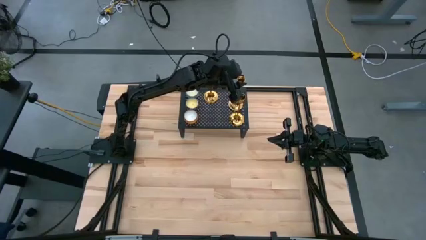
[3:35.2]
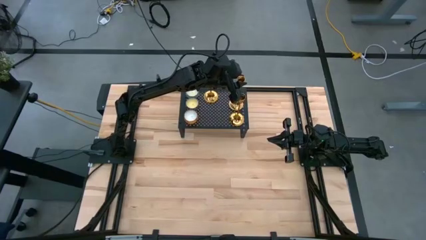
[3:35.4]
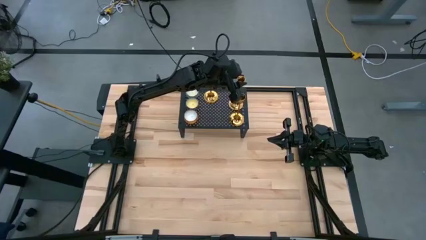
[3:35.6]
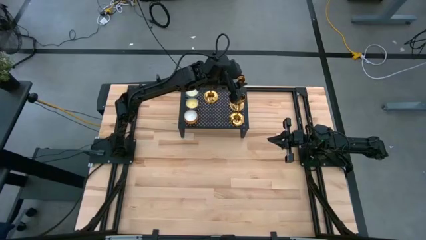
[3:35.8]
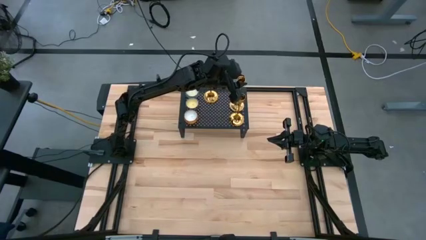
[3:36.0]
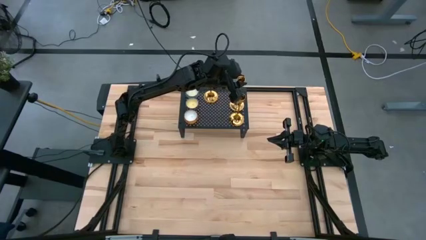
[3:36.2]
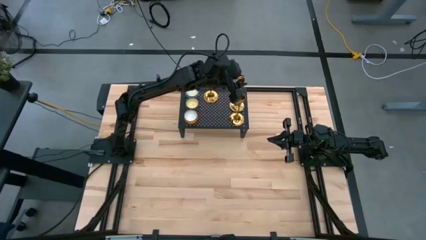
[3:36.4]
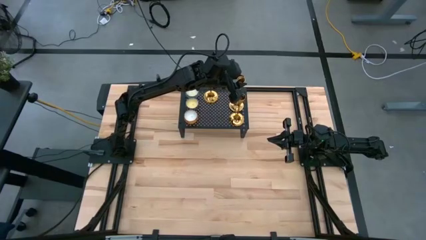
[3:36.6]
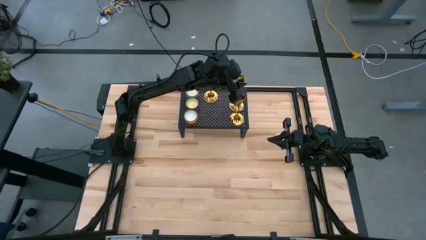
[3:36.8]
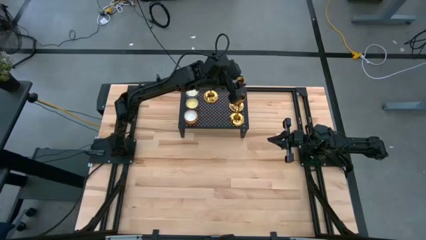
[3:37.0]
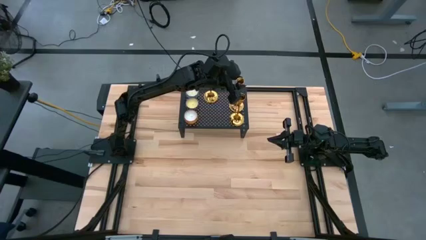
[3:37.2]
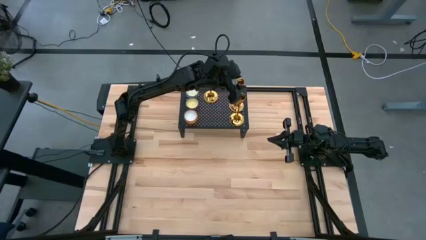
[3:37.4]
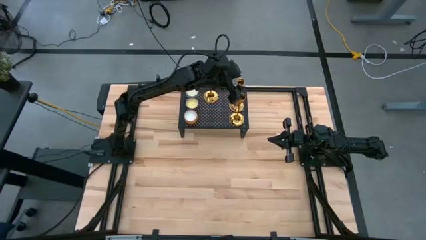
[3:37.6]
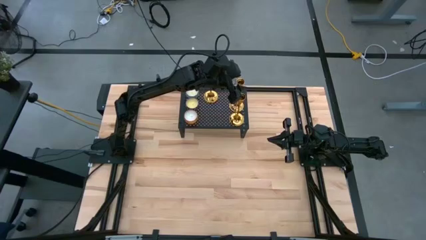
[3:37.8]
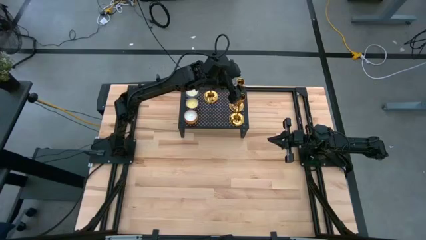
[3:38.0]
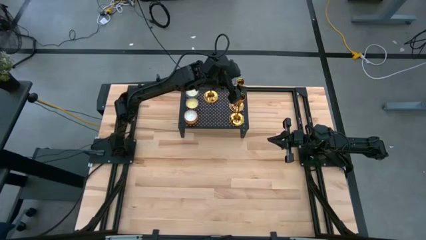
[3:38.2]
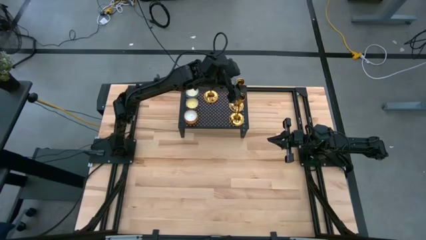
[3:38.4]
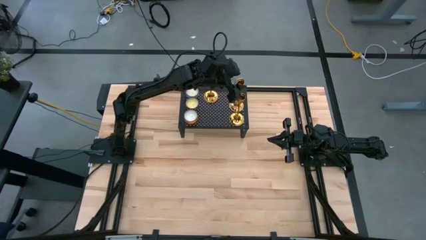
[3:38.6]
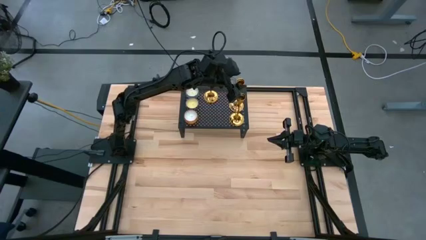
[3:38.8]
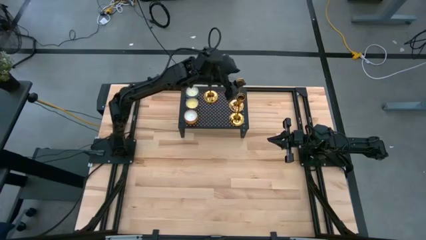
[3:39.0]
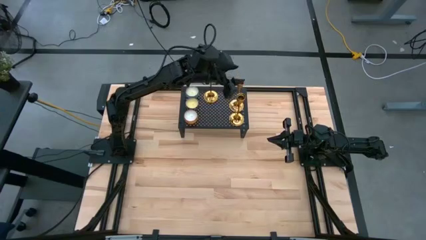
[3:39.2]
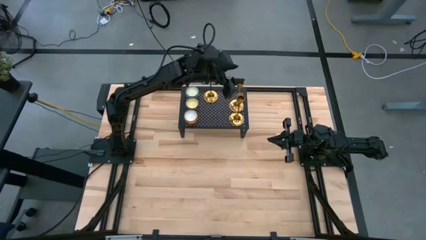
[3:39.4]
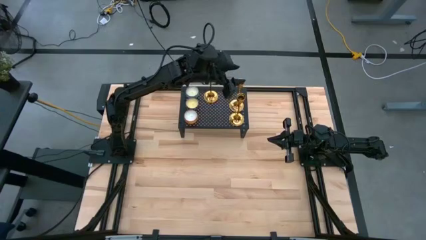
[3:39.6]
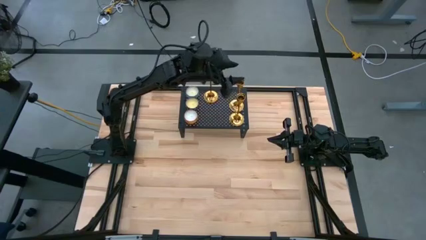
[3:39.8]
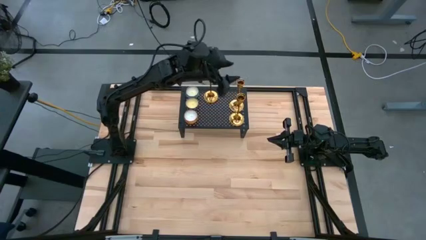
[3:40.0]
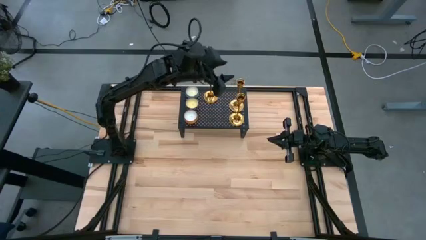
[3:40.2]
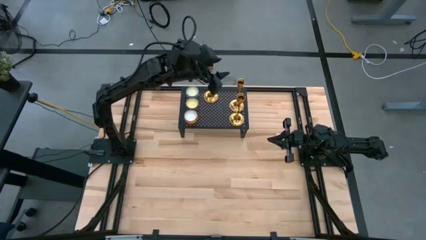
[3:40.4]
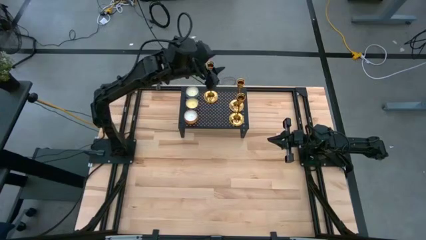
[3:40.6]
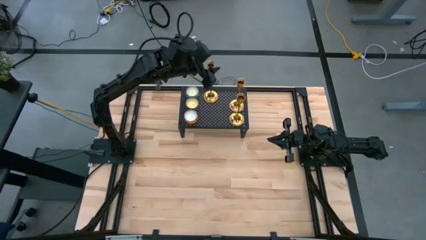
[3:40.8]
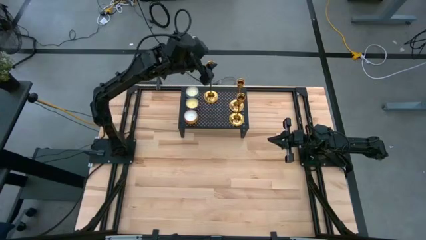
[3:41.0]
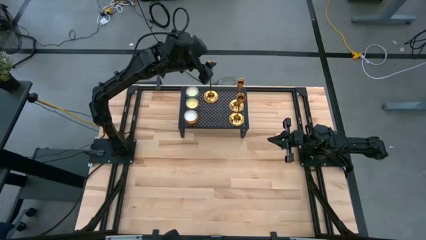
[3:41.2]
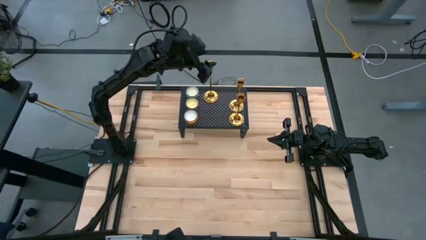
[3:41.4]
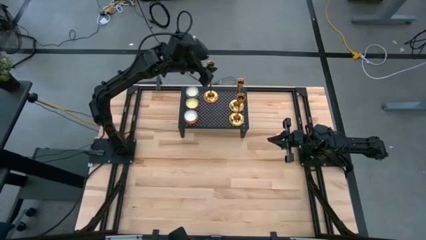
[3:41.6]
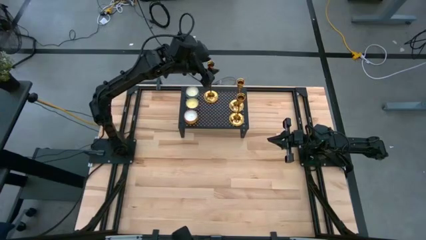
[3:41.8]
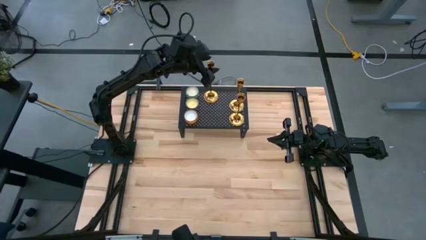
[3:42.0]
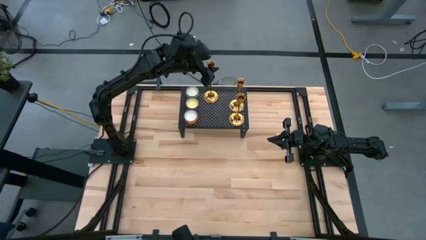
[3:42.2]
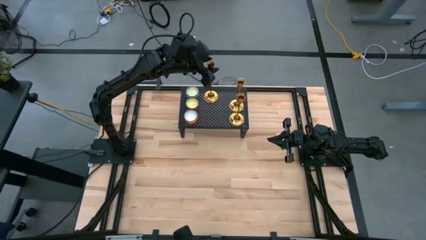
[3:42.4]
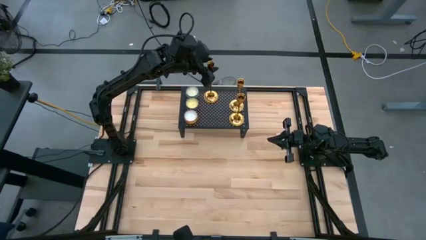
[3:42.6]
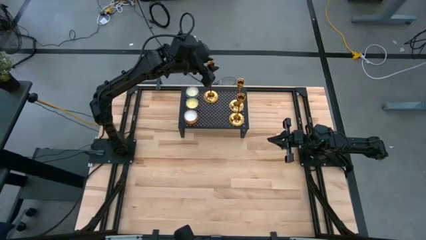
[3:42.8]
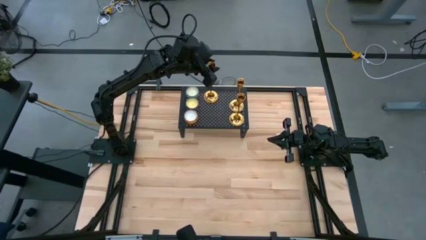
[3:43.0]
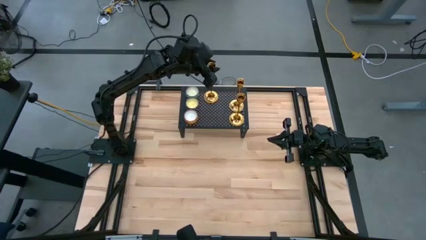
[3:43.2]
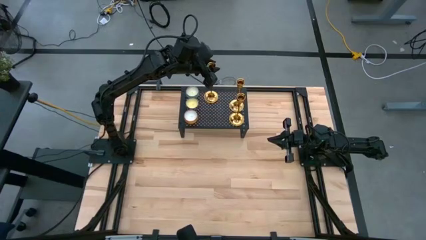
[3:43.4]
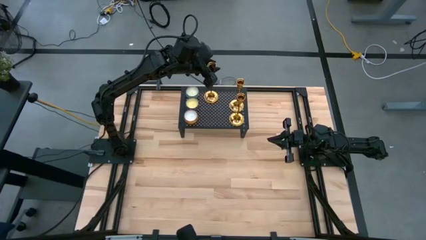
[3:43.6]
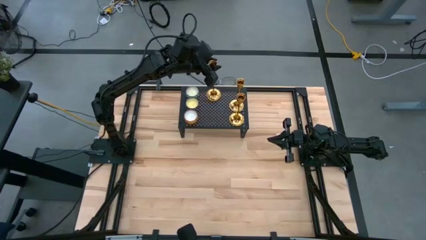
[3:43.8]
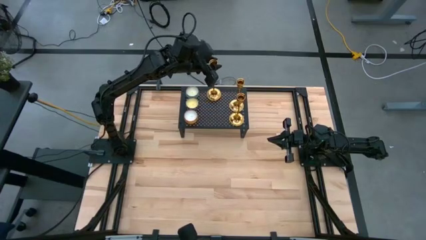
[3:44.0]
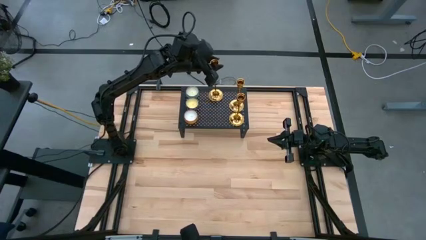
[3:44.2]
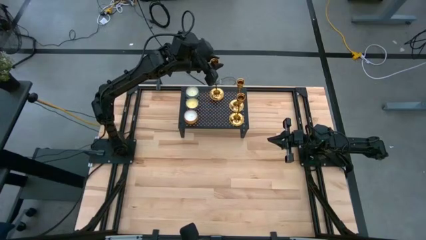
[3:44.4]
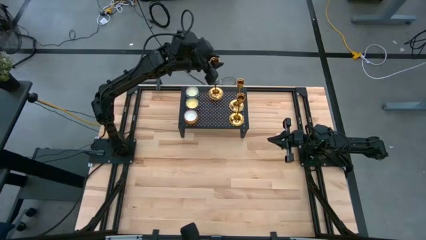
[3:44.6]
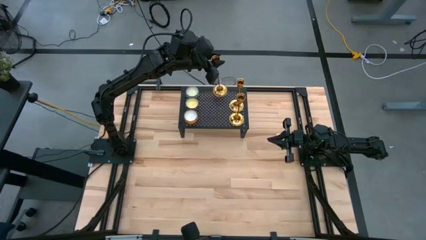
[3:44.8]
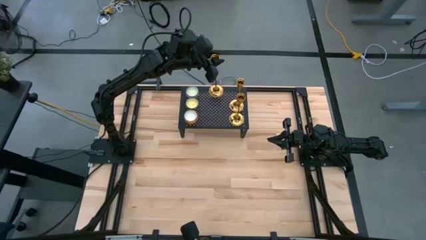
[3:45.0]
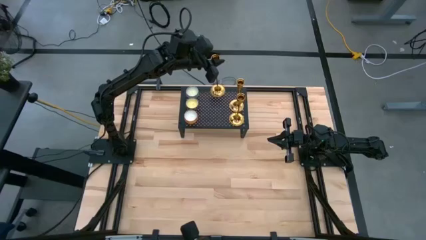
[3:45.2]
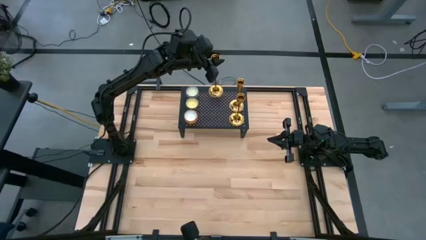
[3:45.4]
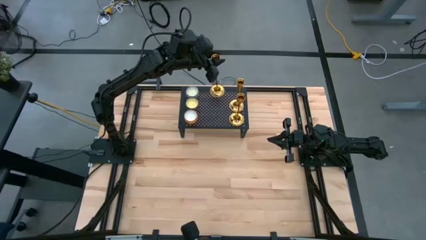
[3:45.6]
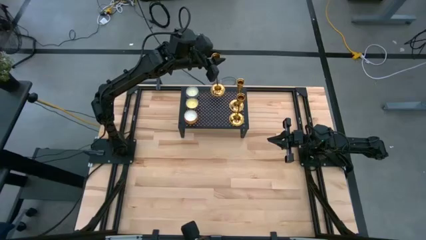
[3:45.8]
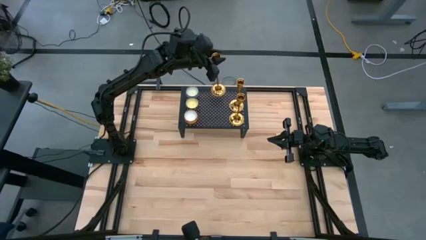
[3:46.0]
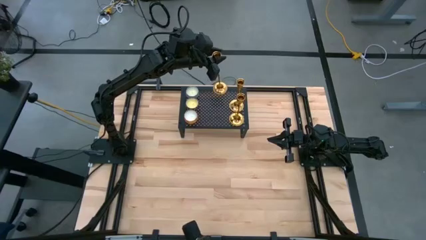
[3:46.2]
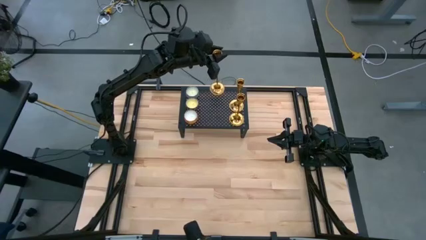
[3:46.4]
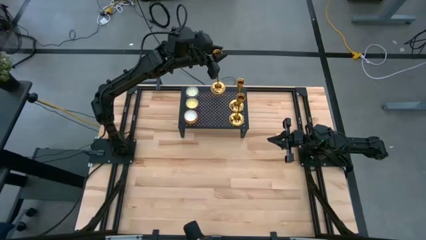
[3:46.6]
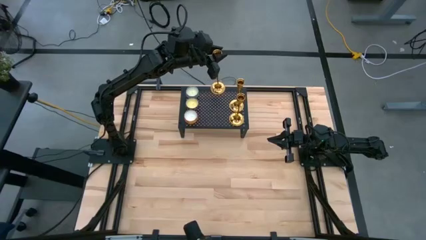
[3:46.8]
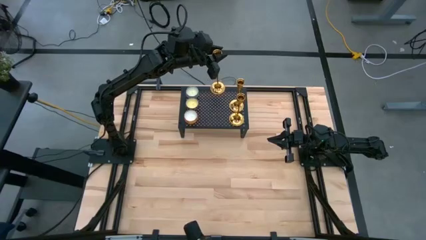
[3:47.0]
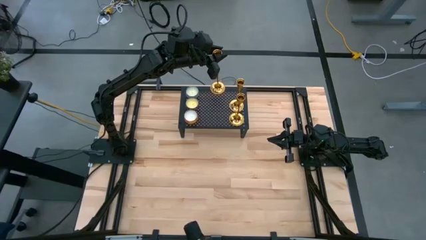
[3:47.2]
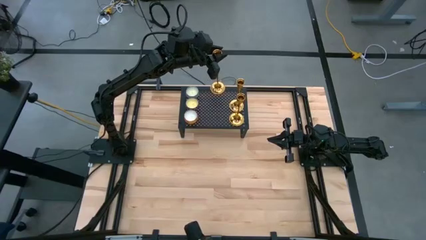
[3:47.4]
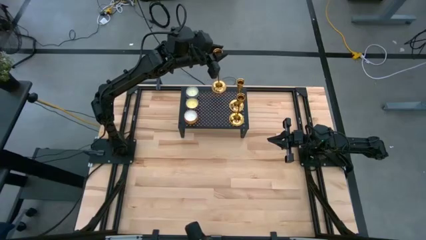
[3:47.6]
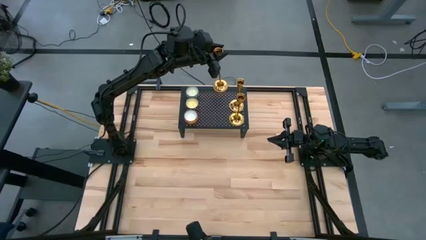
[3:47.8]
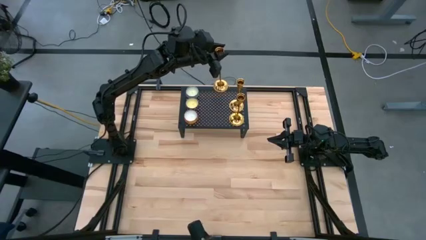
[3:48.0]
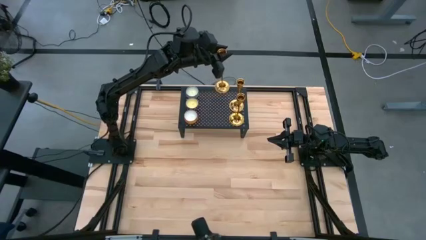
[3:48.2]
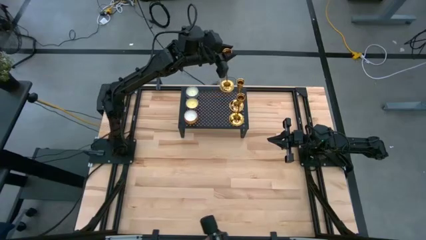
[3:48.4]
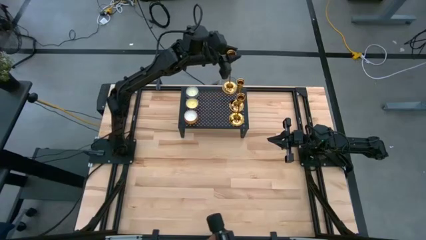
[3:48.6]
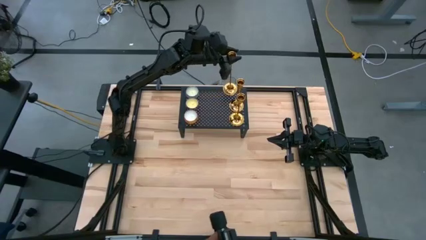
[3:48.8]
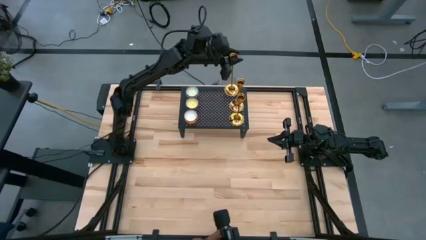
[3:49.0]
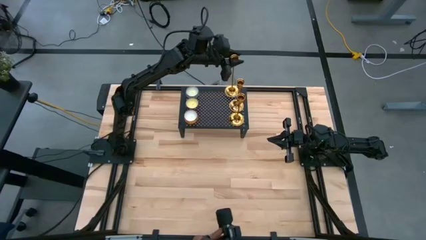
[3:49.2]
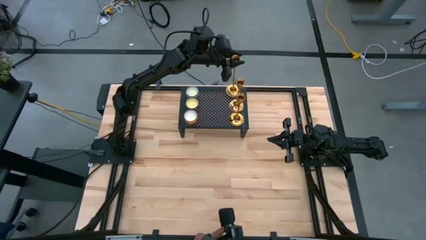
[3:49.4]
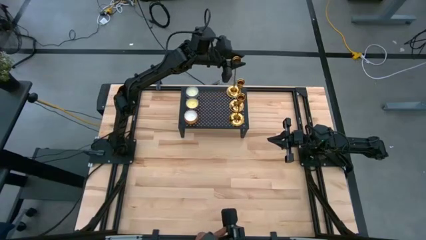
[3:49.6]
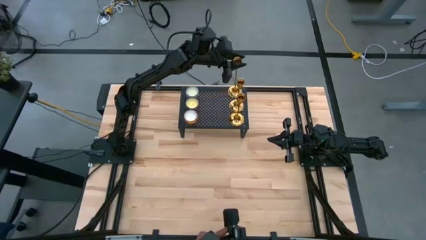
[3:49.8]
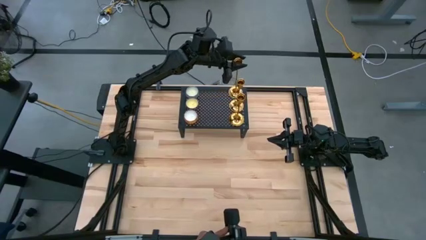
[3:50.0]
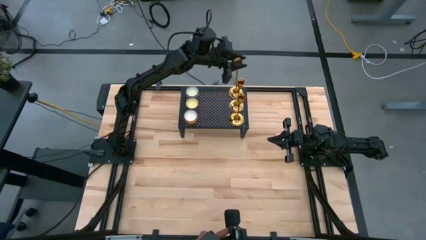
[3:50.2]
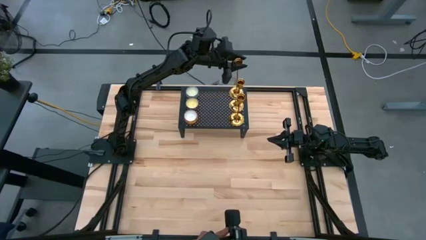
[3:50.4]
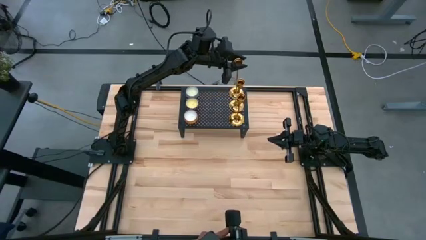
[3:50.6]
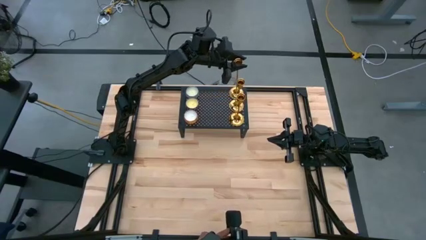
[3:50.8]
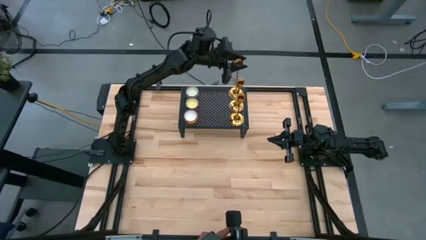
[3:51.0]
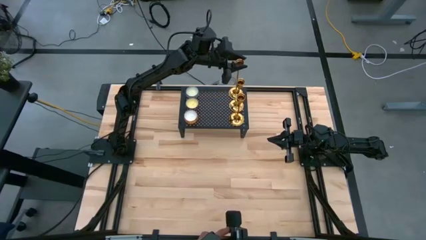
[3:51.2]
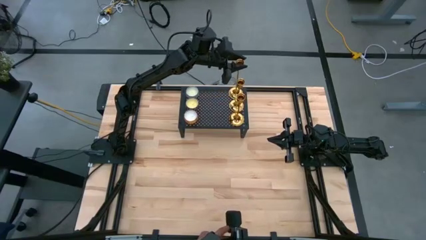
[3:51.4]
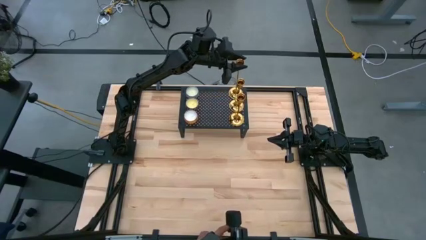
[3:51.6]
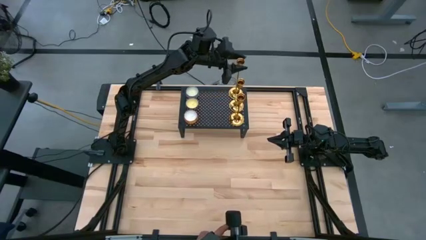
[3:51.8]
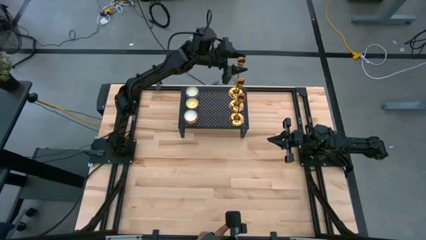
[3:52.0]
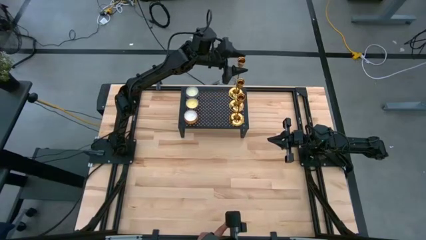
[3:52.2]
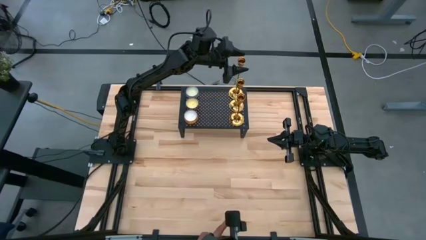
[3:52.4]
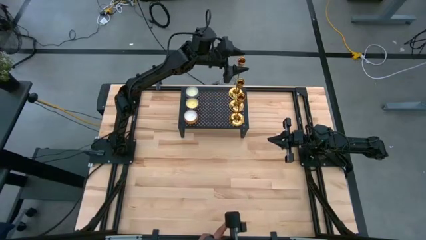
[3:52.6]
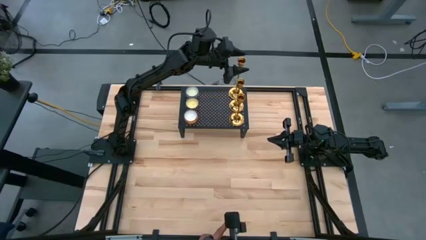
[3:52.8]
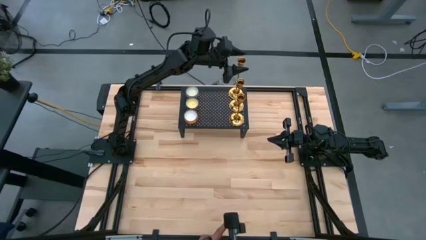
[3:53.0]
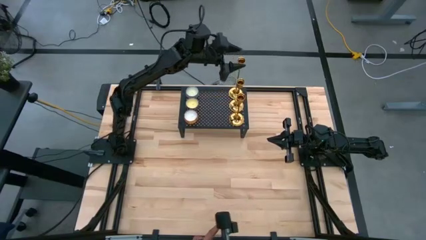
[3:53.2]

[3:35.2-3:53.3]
Task: Pick & Place candle stick holders
Adjust the candle holders on the shelf
